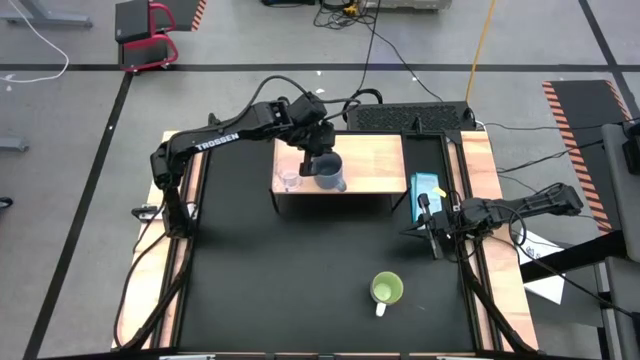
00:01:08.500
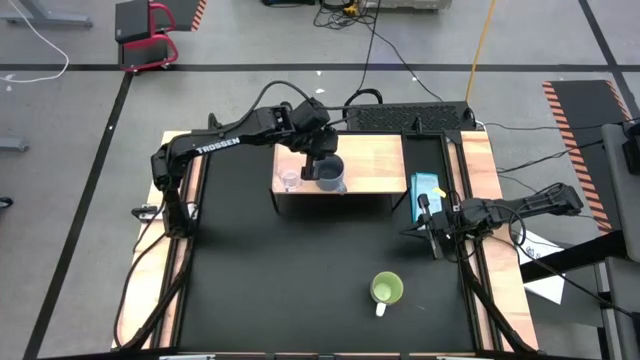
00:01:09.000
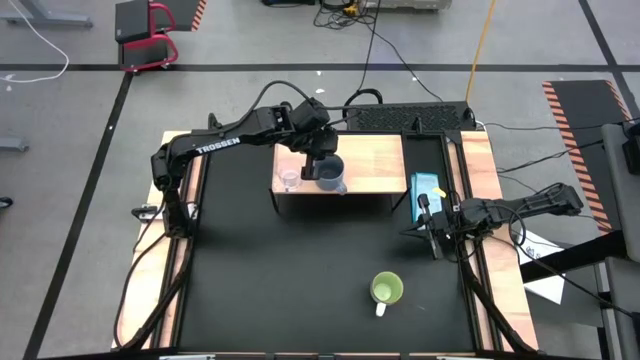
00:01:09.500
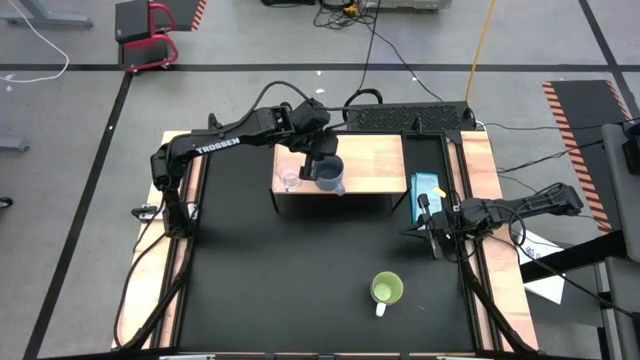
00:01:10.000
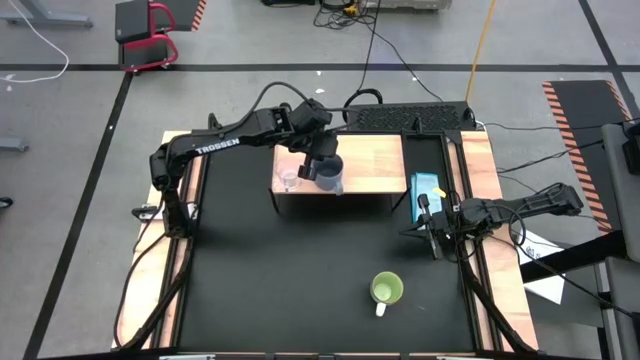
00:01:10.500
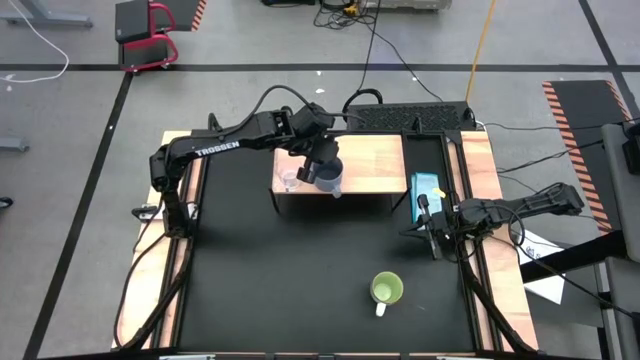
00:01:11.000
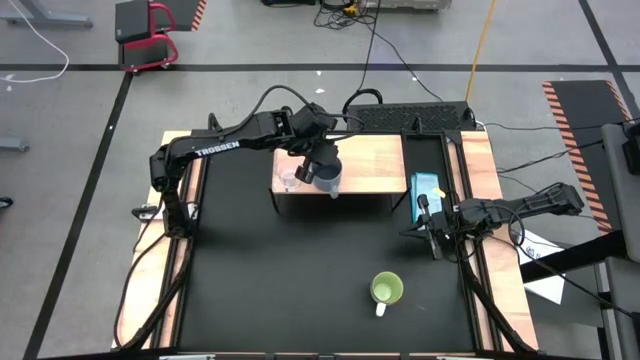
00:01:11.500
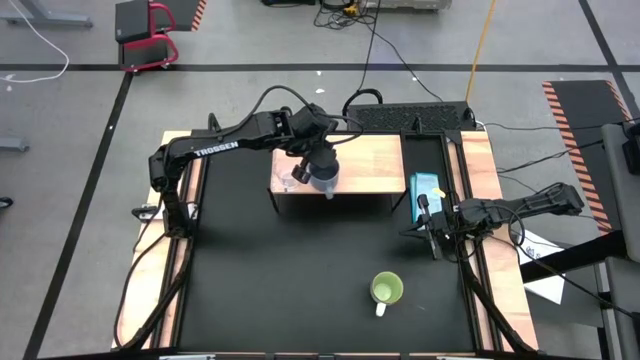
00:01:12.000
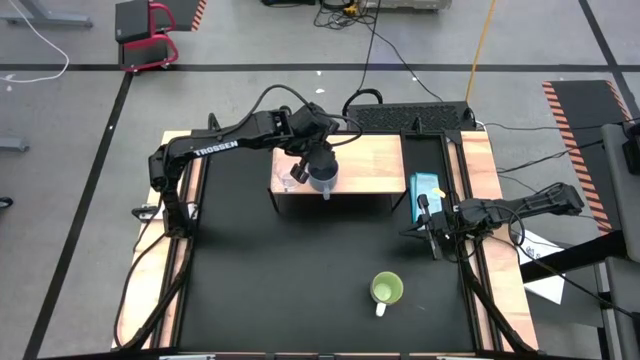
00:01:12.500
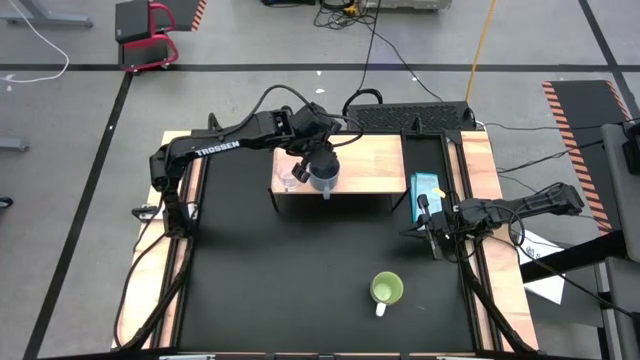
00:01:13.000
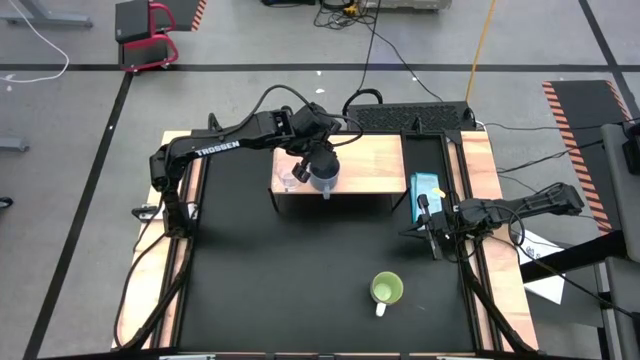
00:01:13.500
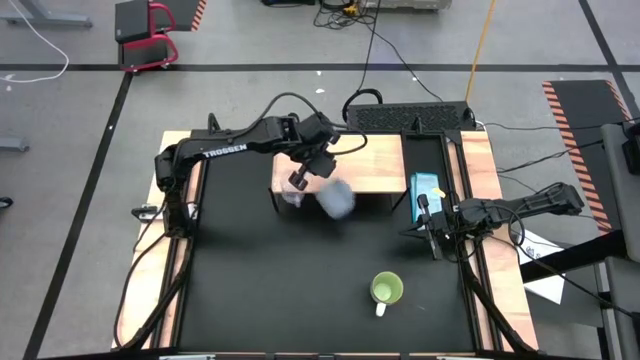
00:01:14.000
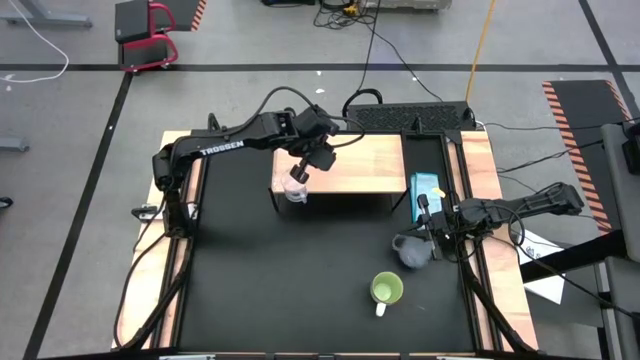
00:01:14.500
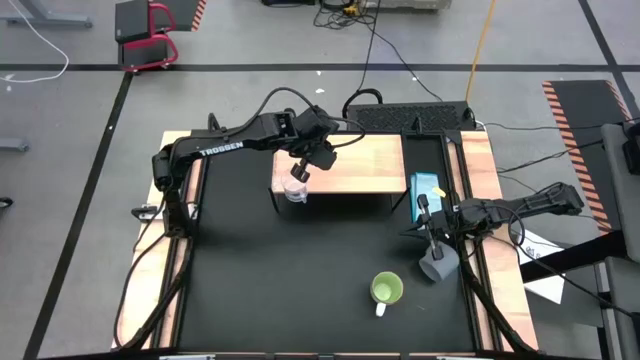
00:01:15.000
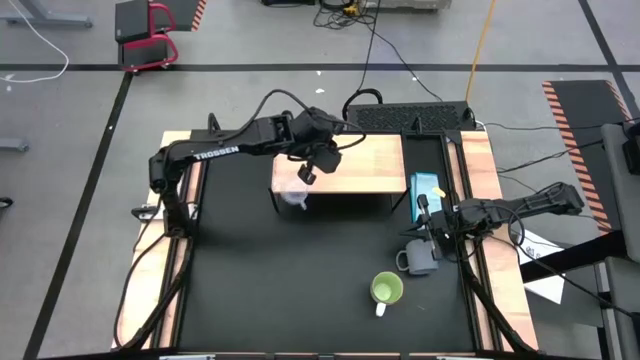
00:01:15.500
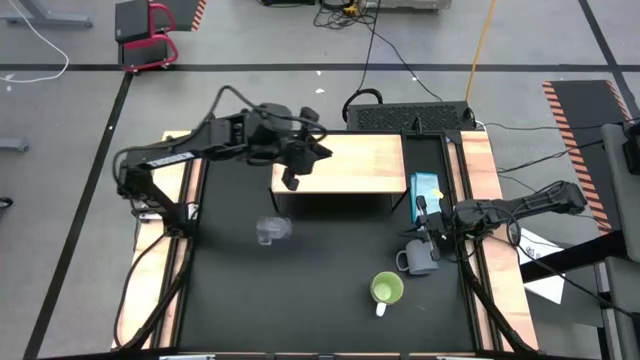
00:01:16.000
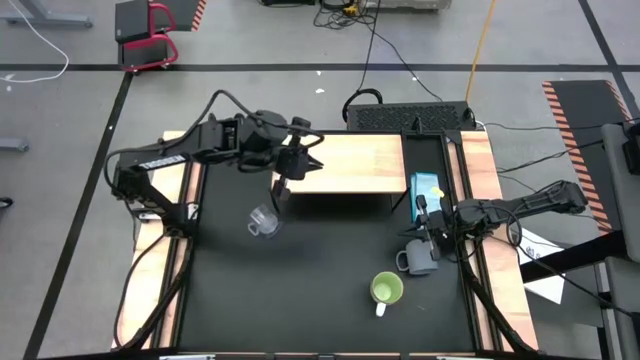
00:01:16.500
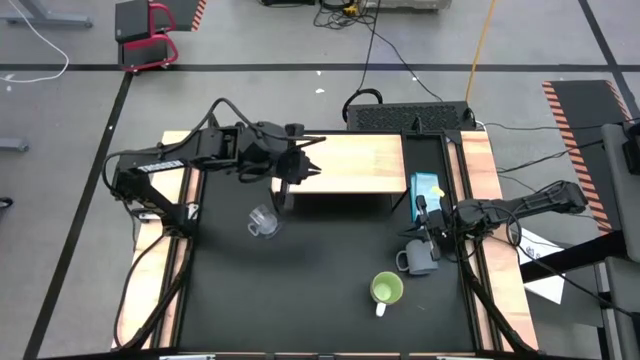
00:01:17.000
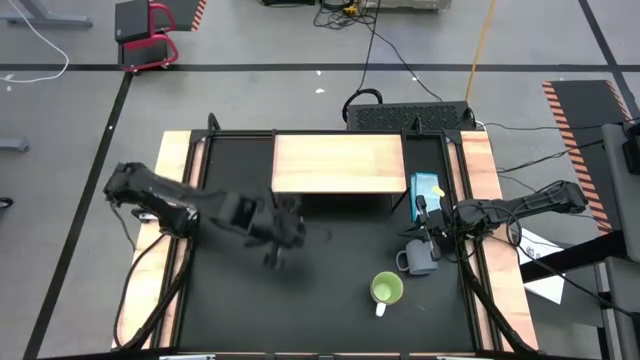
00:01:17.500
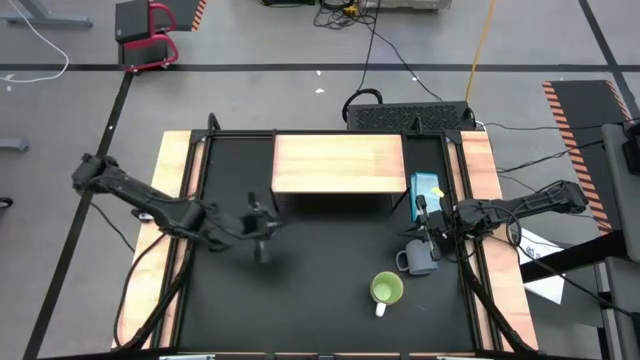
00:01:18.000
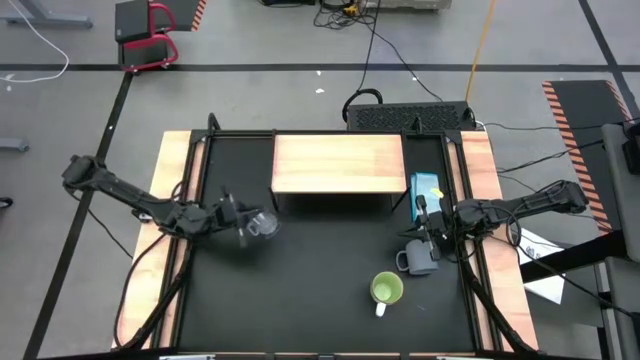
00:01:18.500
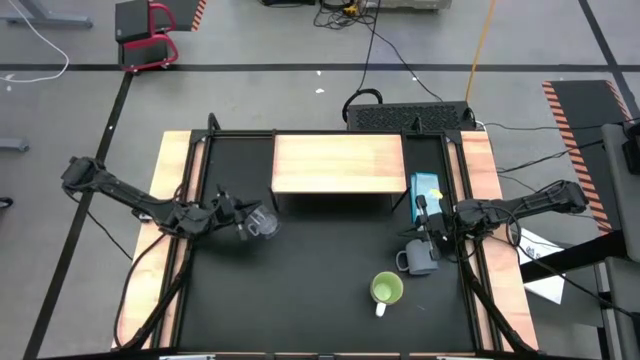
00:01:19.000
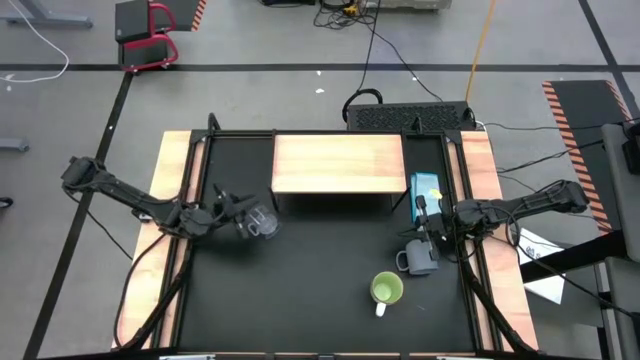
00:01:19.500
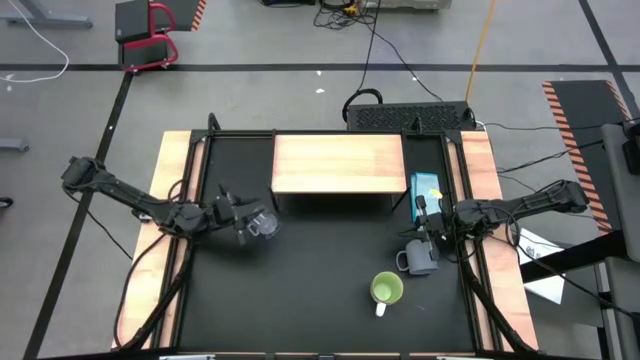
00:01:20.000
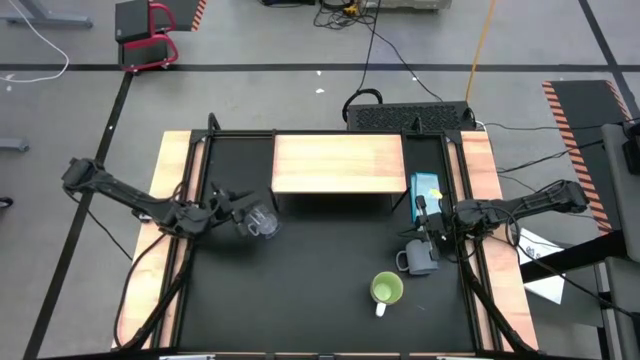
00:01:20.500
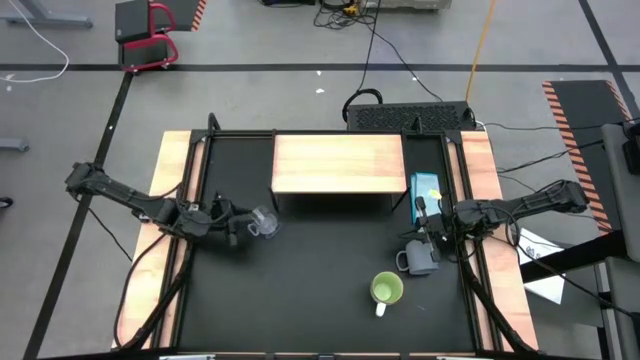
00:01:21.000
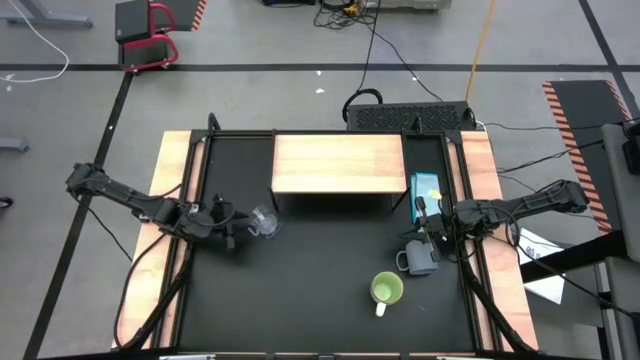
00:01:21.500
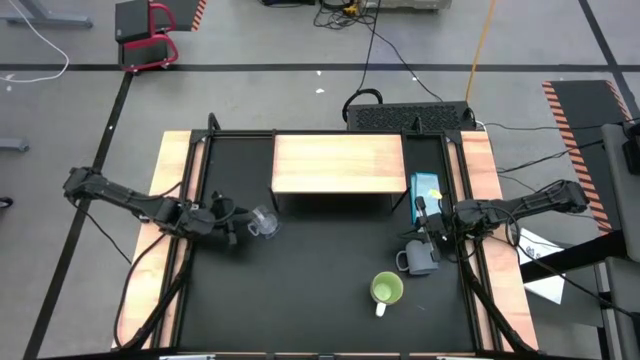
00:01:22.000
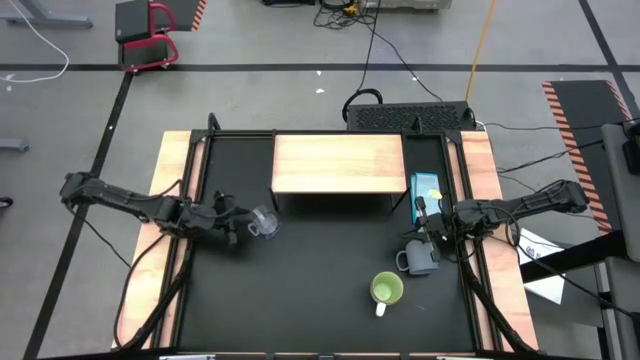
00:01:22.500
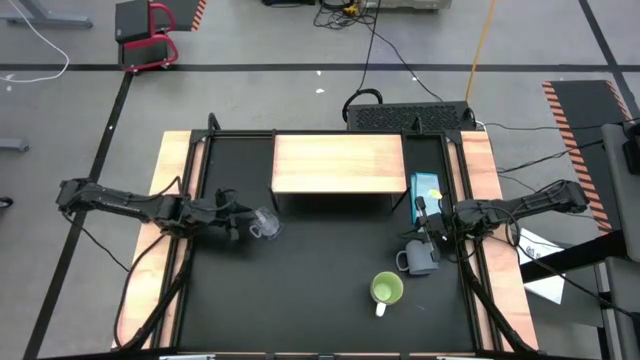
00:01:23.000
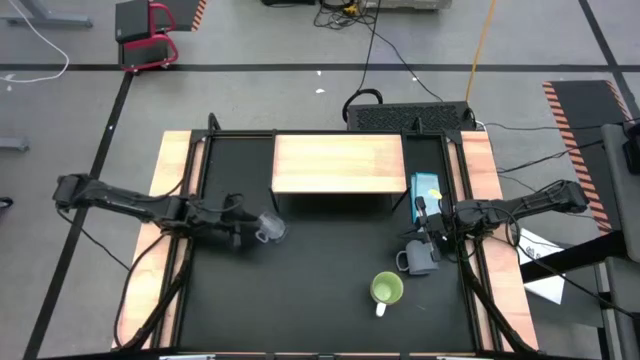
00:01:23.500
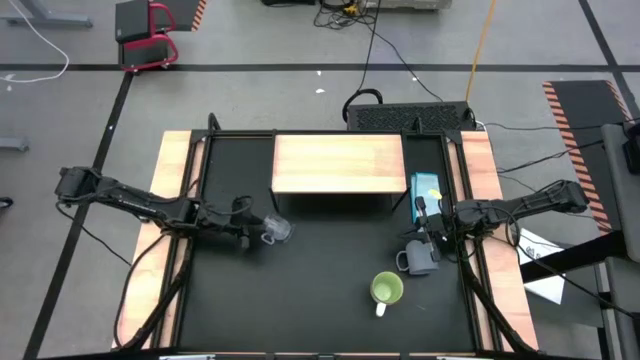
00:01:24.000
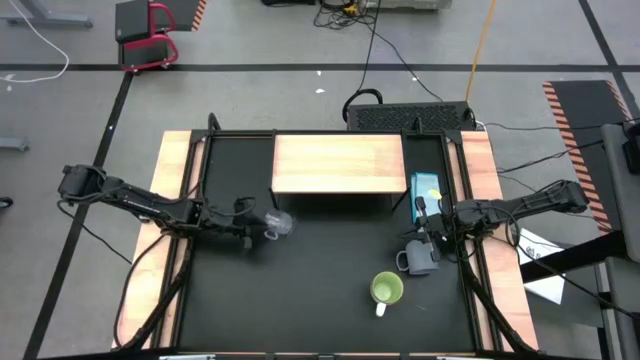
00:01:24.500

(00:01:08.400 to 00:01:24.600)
Task: Stack small to large cups/mugs on shelf
Put the gray mug on the shelf

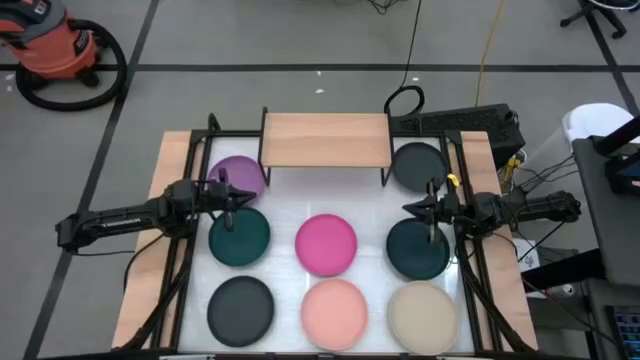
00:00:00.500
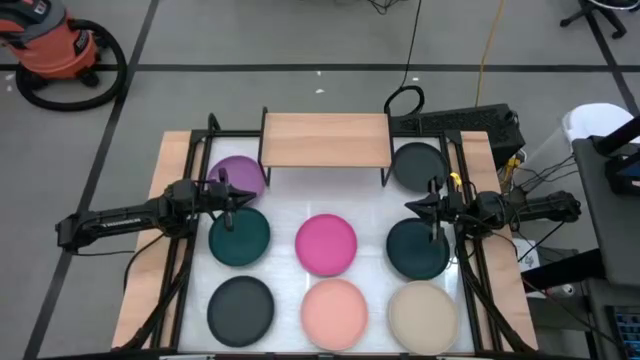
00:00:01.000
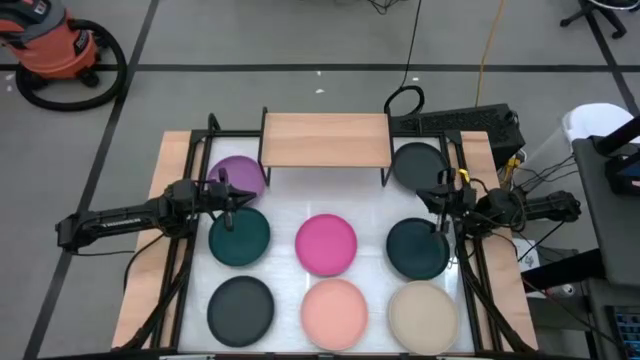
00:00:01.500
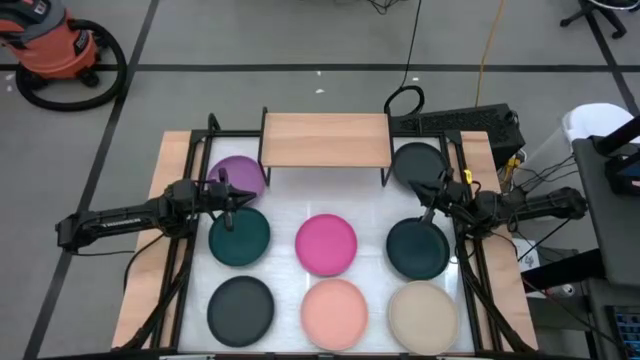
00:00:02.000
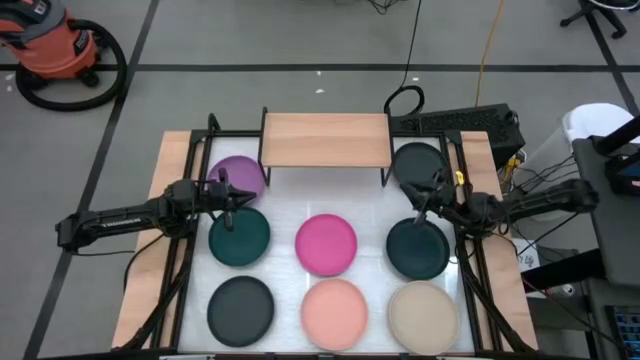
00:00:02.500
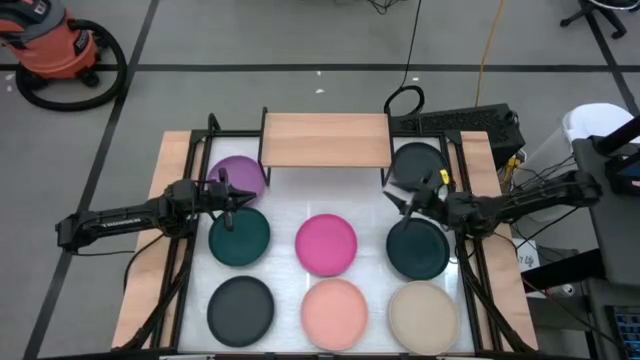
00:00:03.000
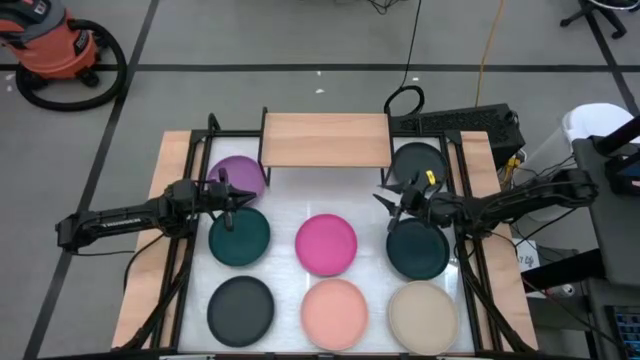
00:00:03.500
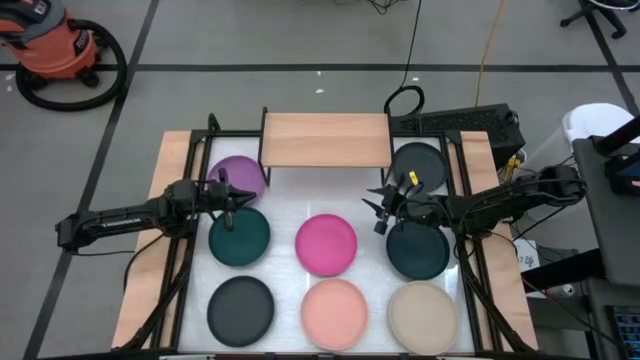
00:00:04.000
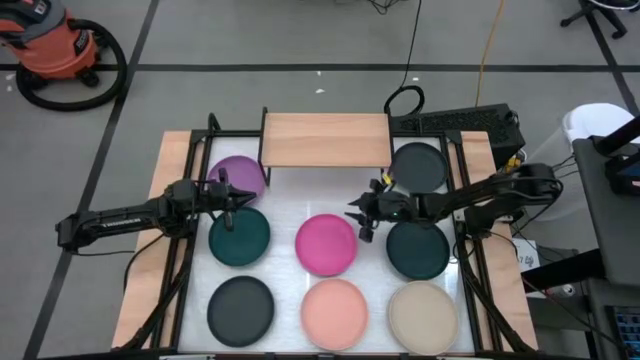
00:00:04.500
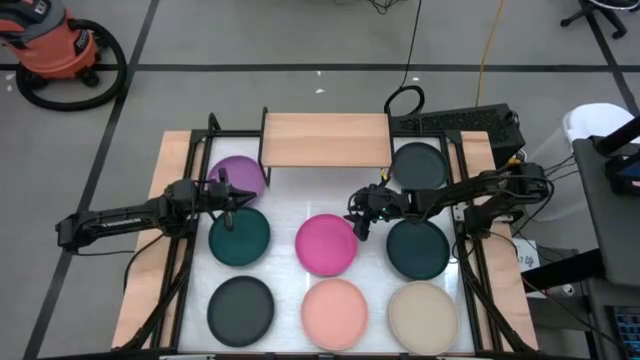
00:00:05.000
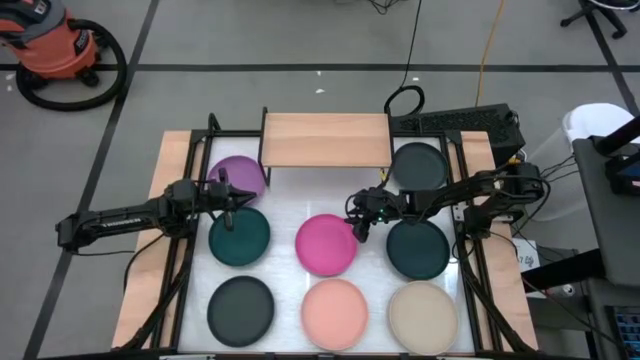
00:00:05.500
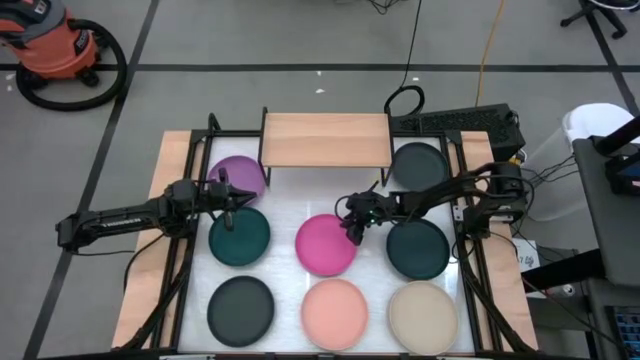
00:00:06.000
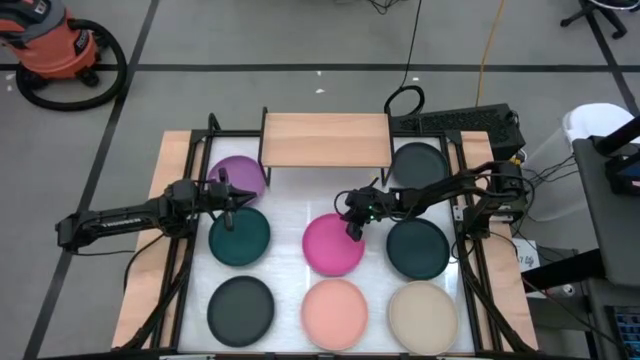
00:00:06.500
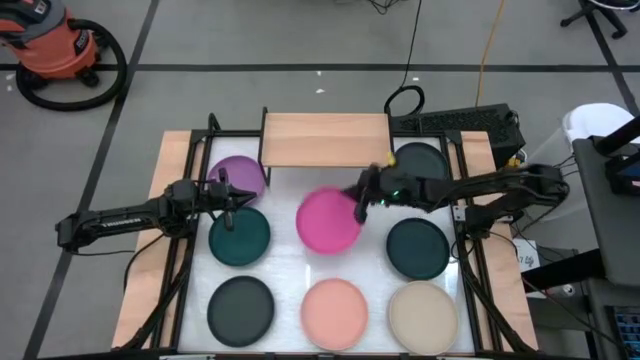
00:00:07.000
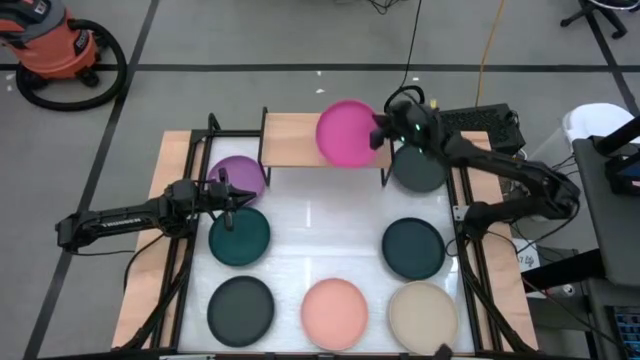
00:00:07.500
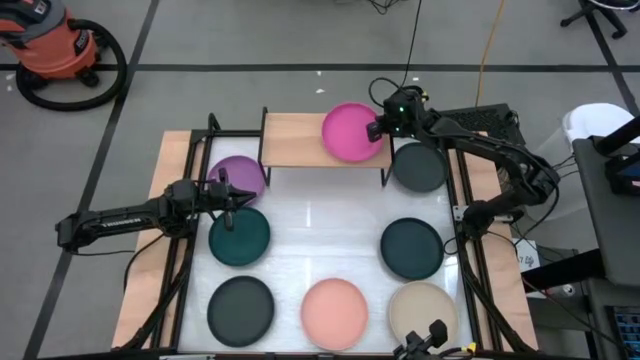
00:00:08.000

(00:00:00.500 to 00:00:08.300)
Task: Place and stack plates onto a shelf
Put the pink plate on the shelf
